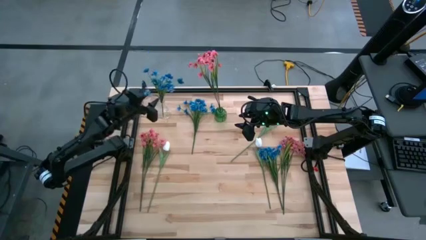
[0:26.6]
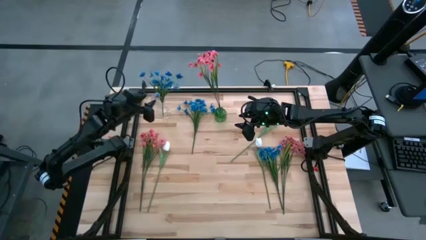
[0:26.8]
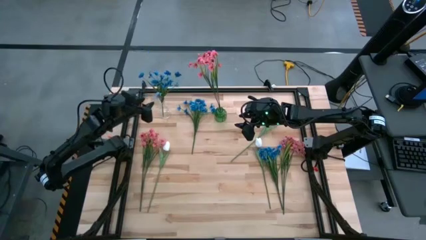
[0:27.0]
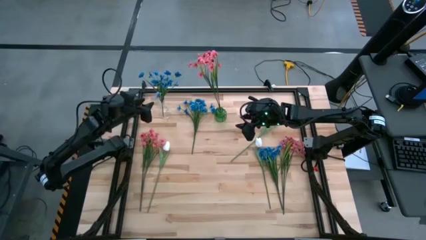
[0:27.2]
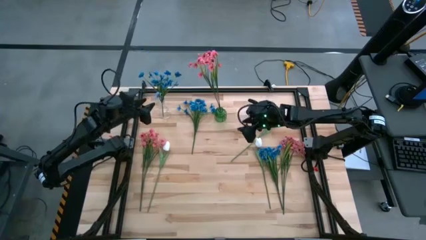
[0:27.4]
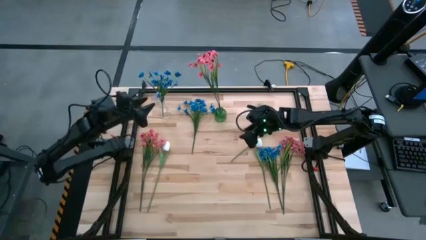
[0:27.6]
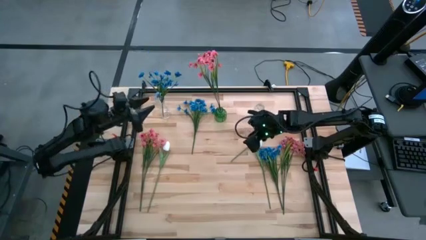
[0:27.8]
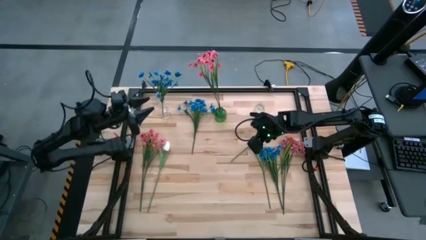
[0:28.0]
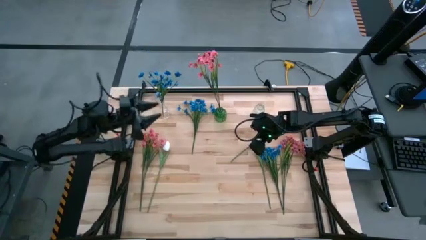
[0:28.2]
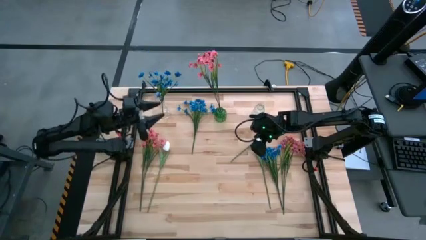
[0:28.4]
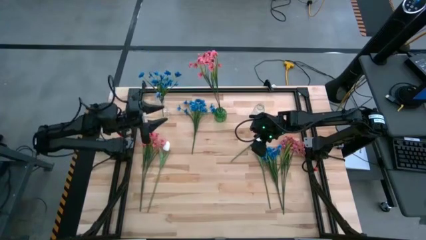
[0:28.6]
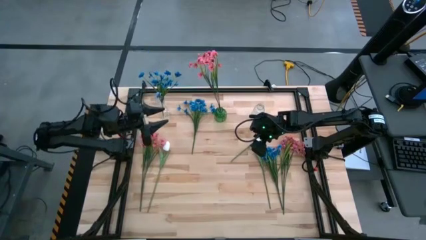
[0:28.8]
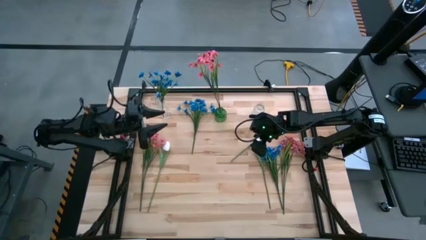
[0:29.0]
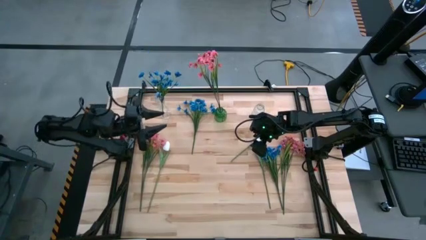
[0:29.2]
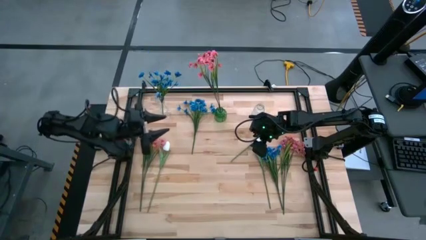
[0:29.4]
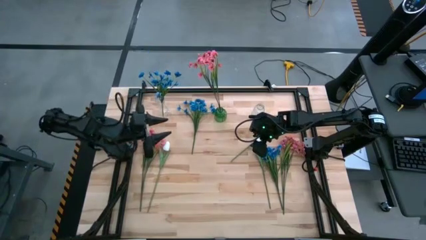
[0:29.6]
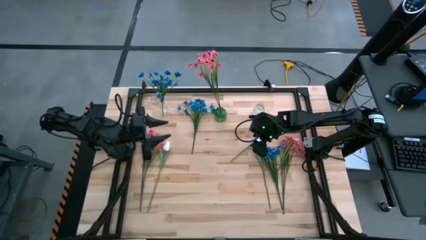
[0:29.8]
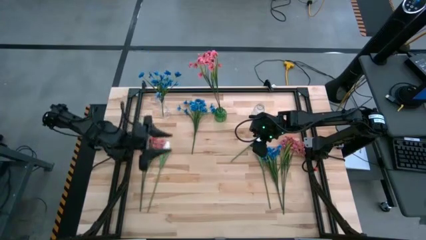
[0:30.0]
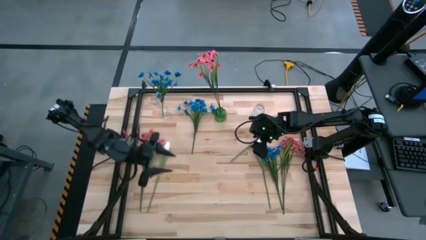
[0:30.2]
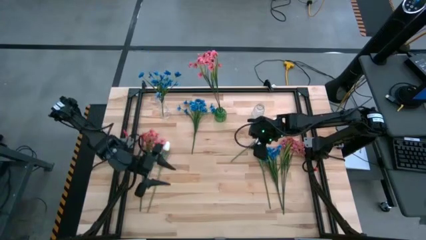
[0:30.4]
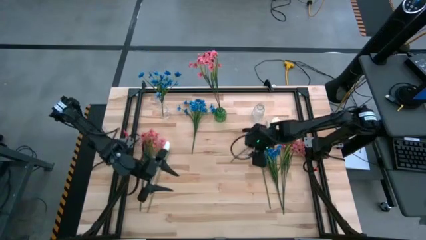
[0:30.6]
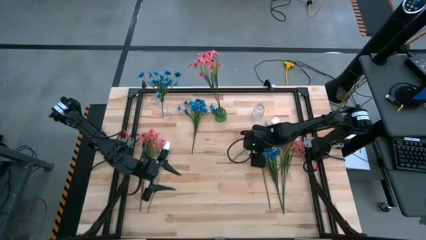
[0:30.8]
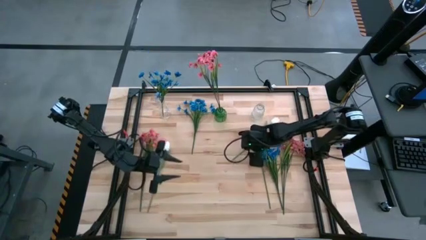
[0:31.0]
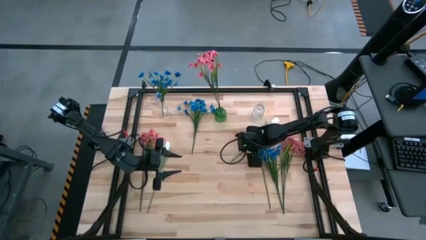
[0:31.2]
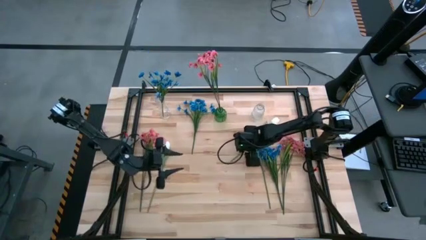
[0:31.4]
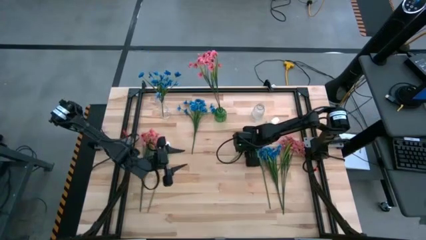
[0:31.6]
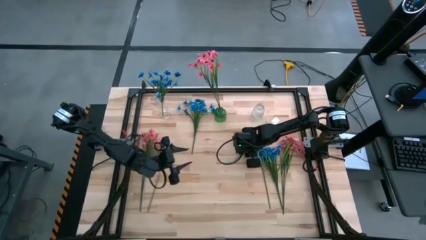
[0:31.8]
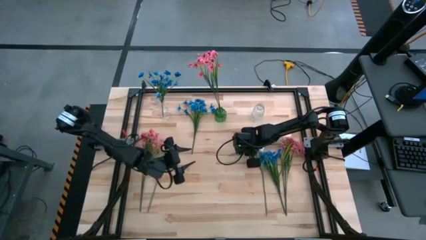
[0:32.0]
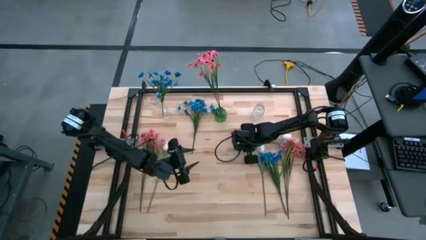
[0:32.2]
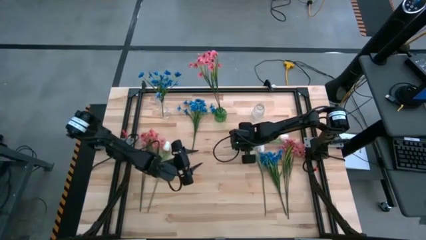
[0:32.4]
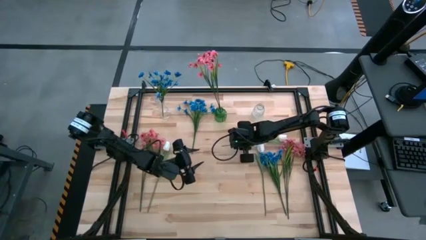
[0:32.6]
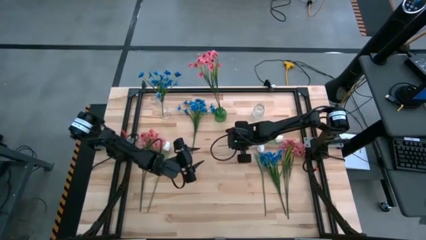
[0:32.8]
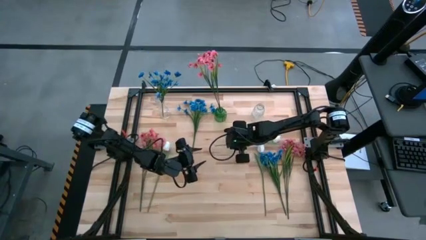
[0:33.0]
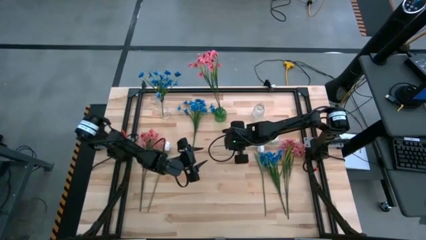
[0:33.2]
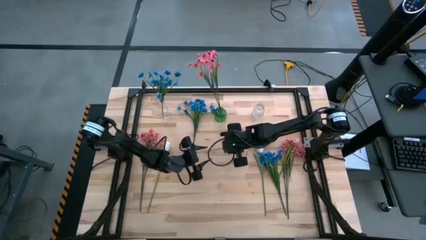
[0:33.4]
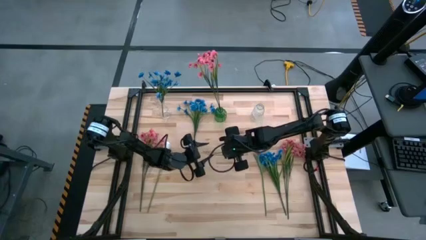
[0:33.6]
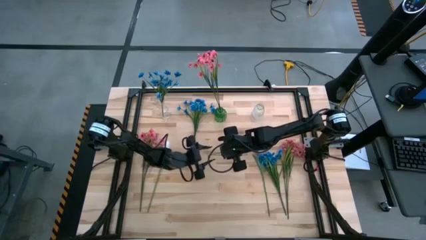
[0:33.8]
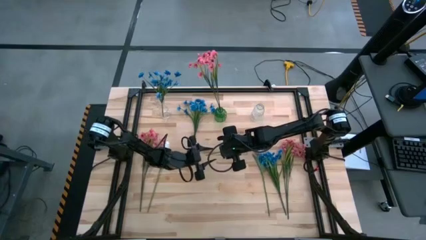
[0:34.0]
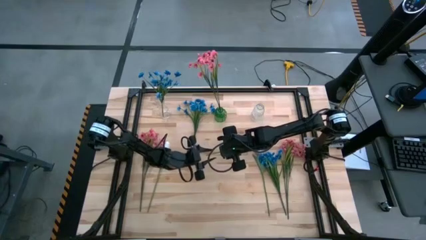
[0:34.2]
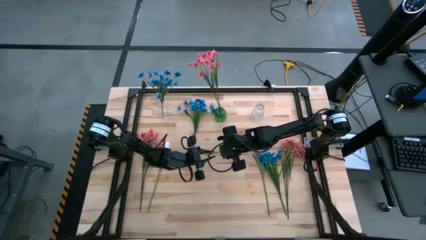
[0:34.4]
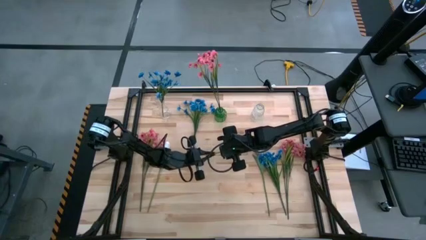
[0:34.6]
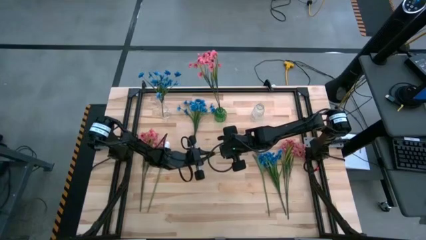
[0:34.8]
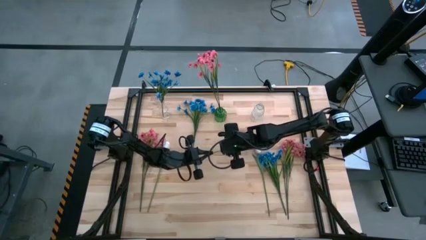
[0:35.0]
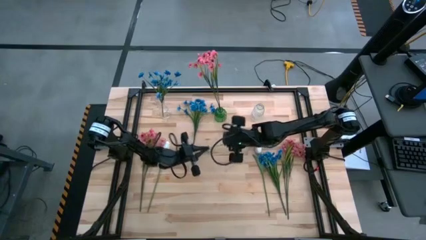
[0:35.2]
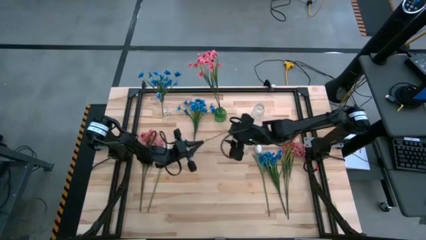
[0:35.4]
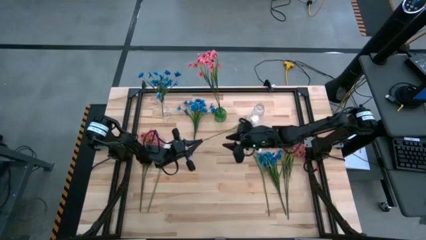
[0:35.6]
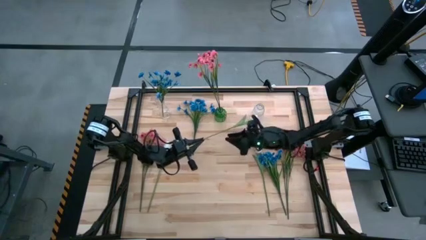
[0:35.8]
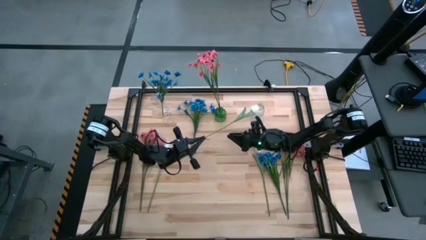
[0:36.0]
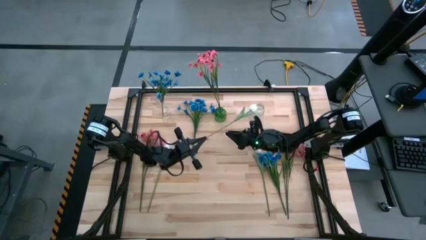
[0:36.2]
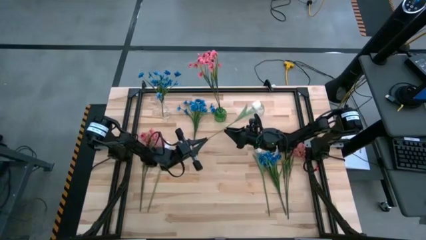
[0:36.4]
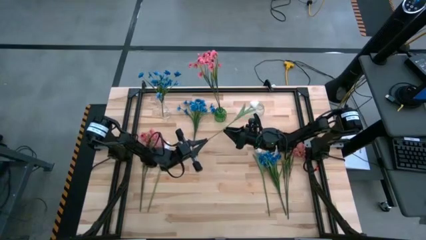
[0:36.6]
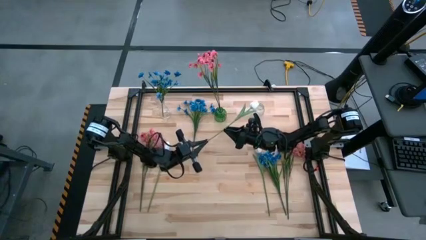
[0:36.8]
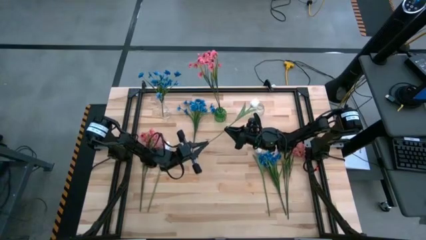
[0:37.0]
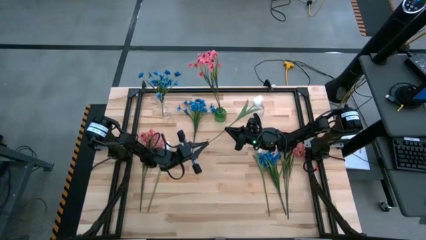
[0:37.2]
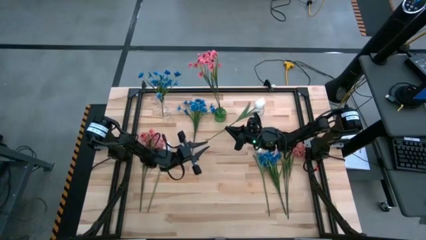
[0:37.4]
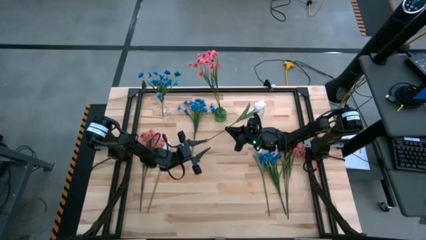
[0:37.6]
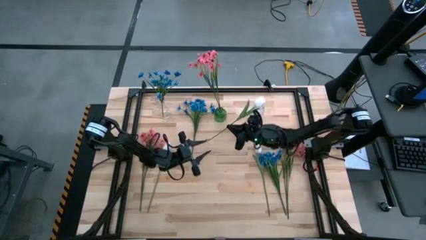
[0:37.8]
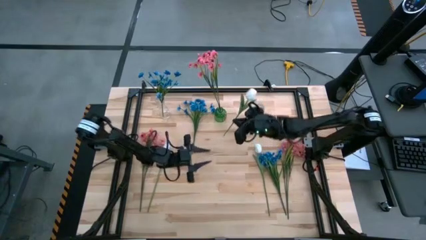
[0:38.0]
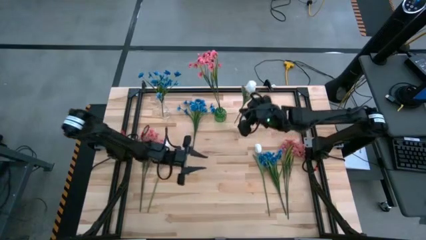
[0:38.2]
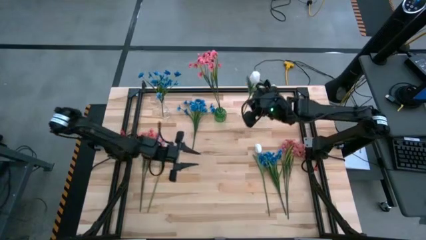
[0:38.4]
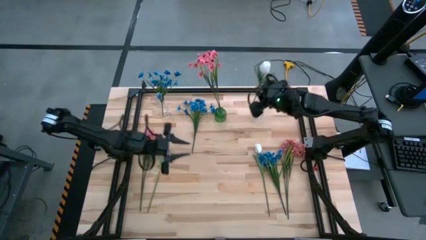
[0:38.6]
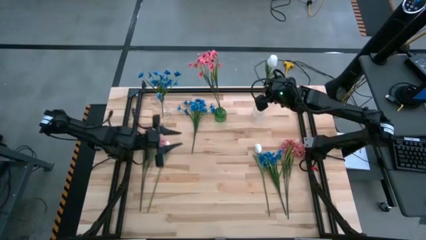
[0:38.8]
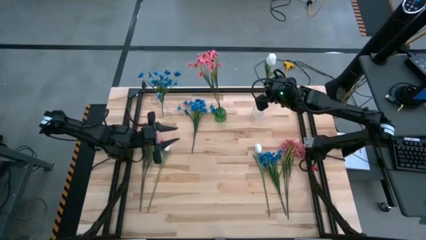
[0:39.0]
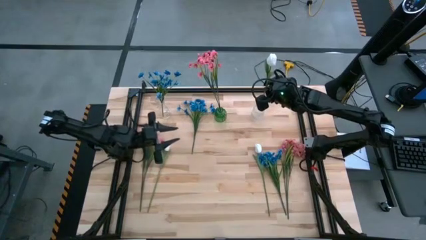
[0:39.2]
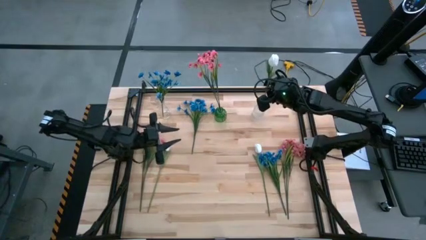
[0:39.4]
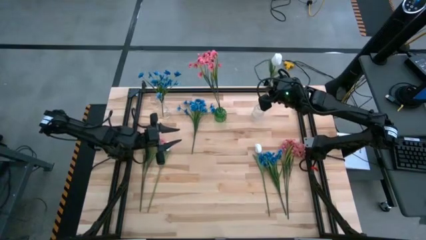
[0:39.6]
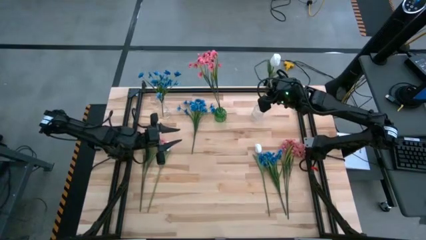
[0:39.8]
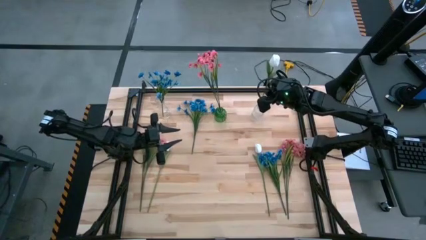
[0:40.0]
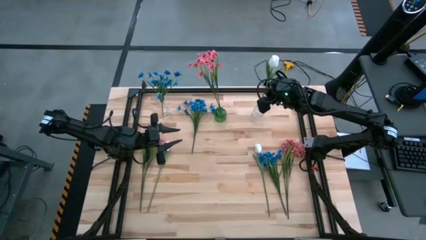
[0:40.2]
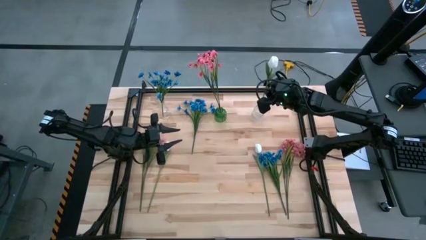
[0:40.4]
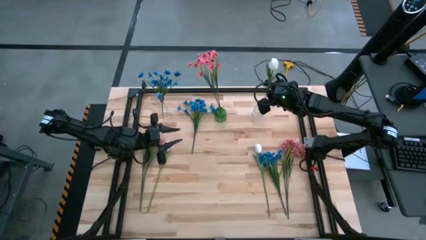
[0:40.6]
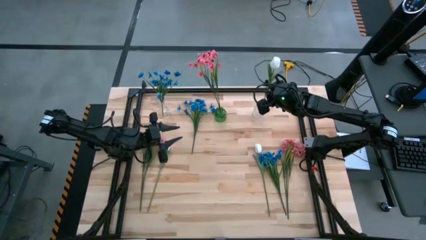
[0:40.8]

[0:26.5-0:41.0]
Task: Sort flowers into vase by color
Put the top white flower into the right transparent vase
